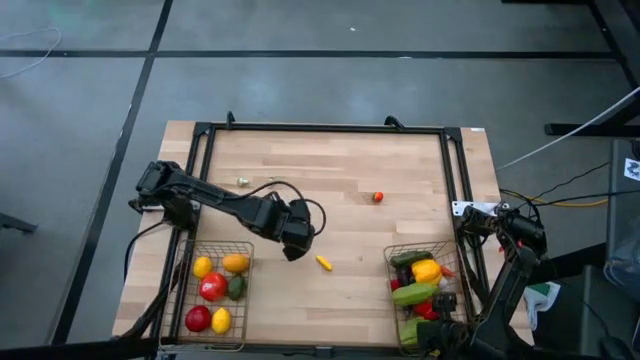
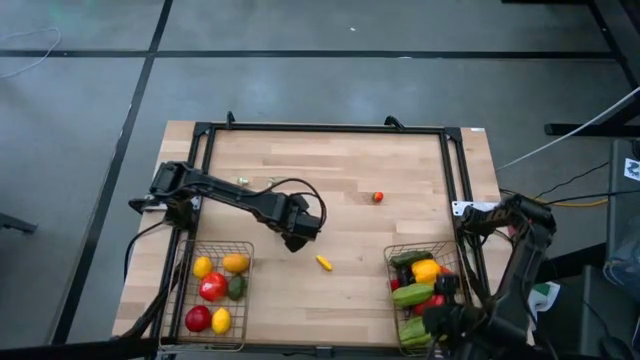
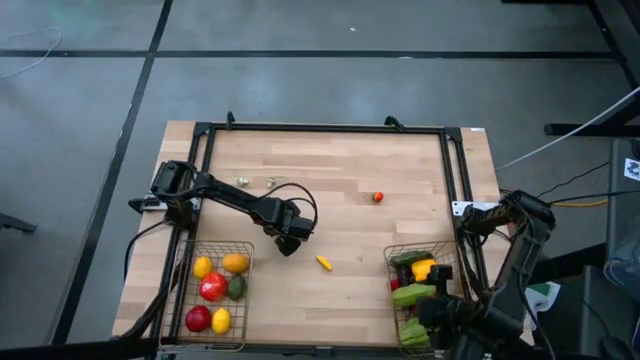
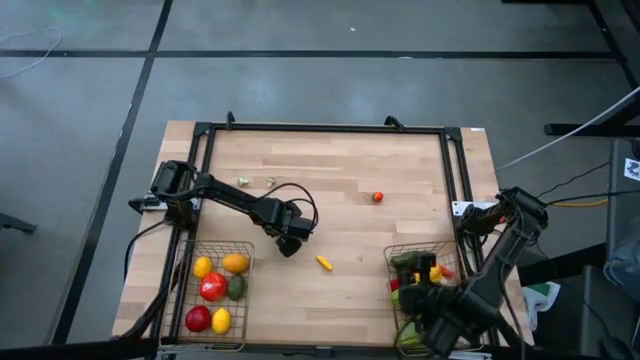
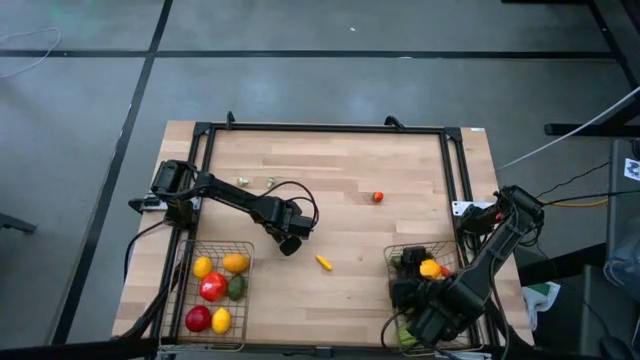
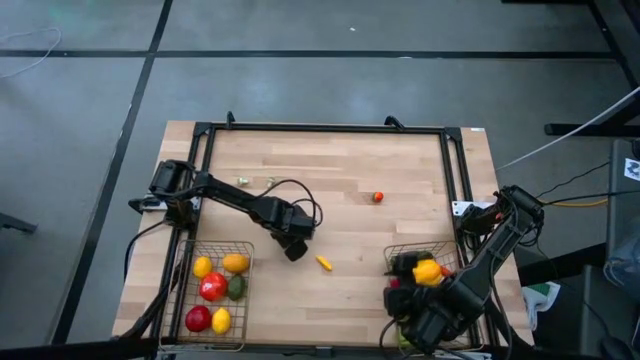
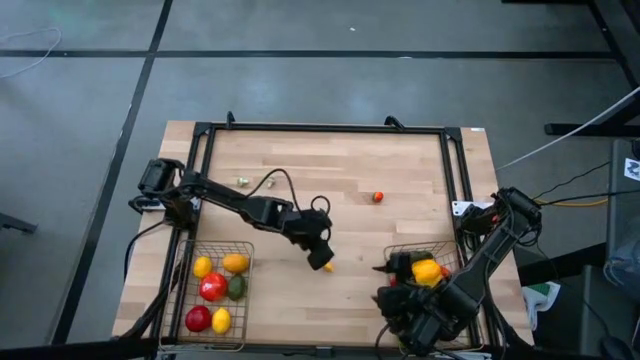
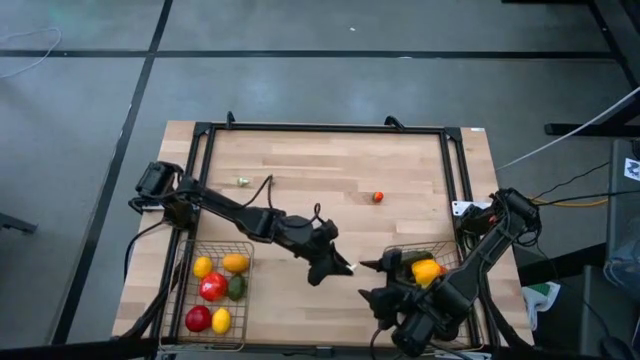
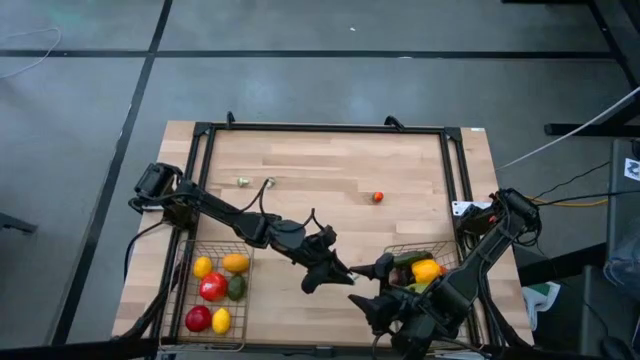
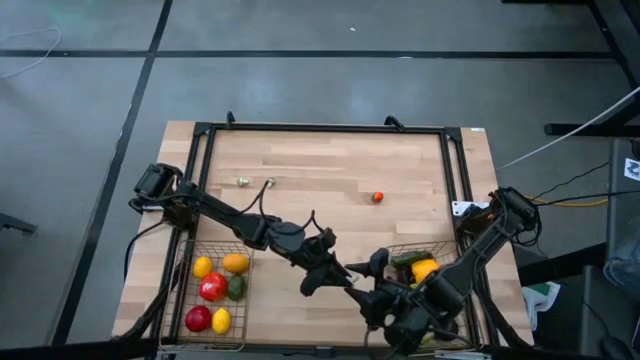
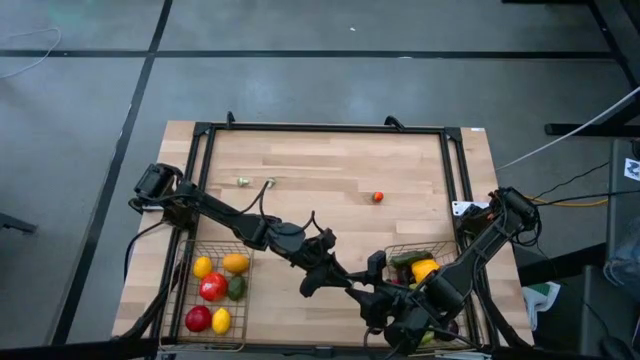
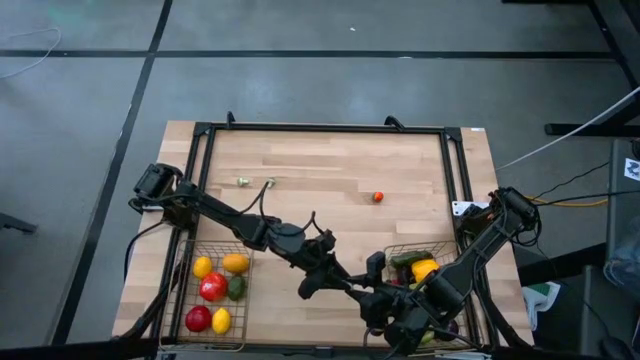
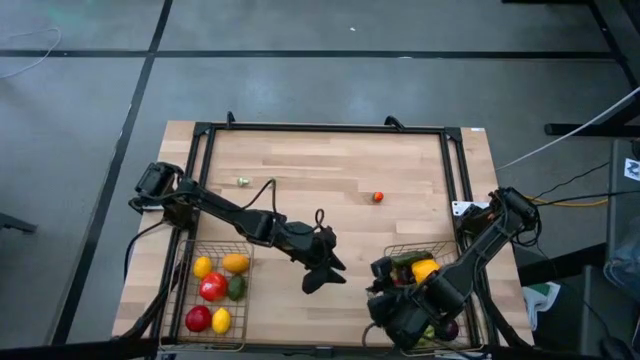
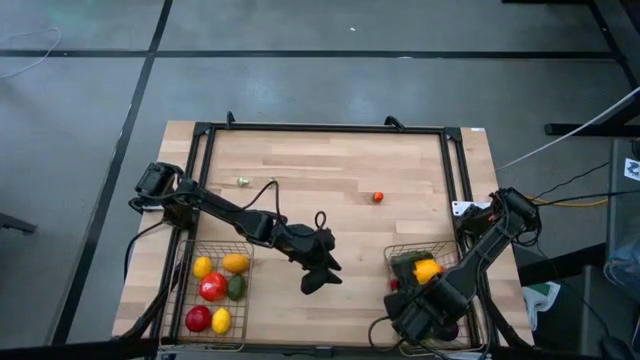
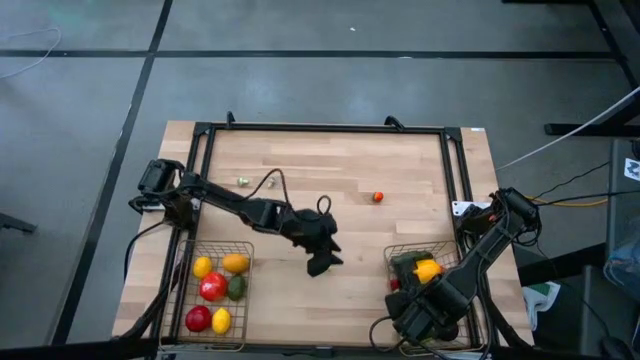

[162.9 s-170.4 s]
Task: Sort produce into baskets
Put the bottom center green mushroom into the right wire basket

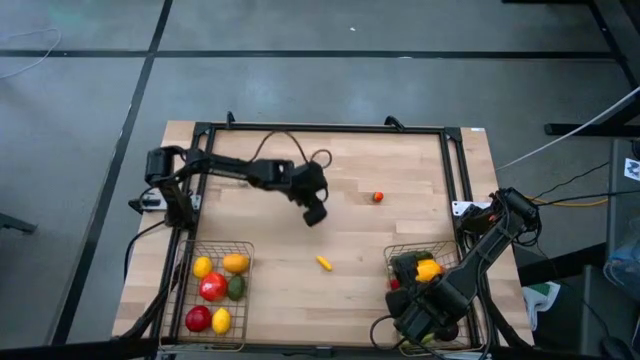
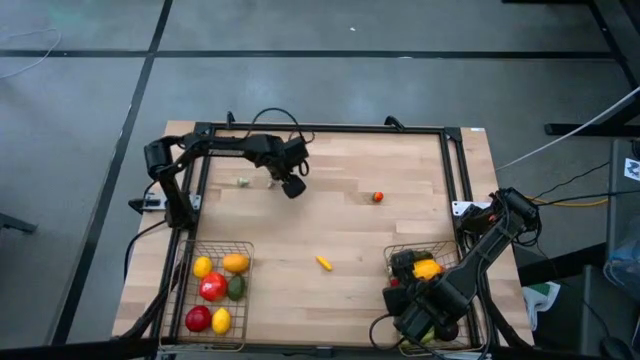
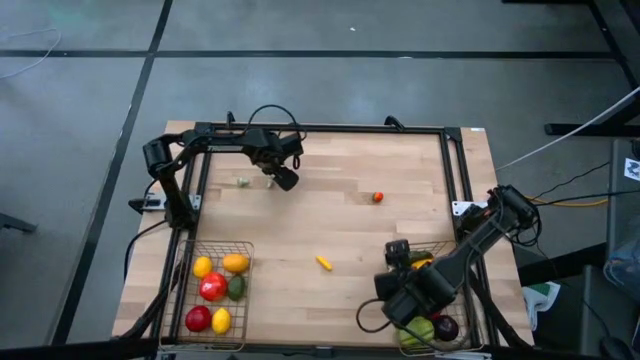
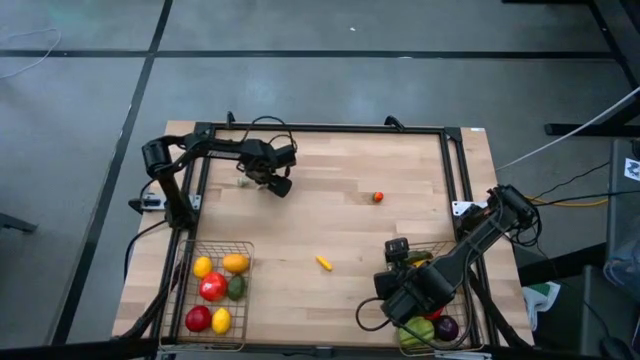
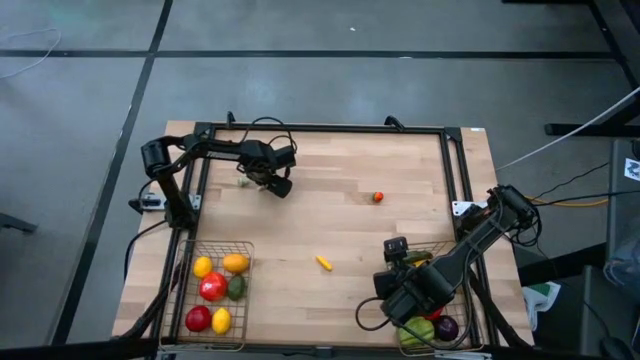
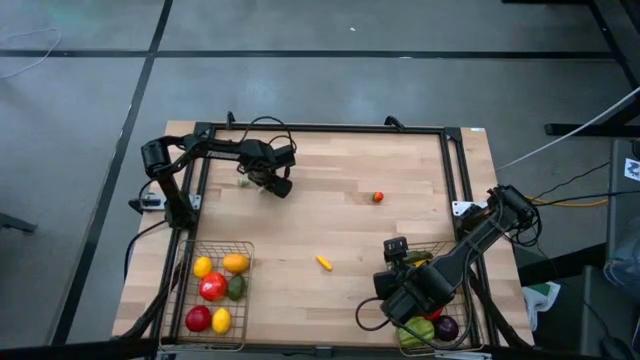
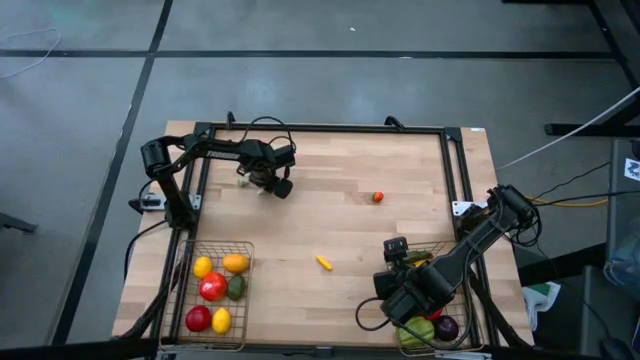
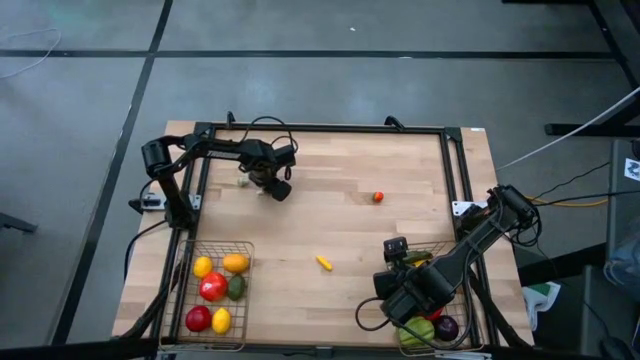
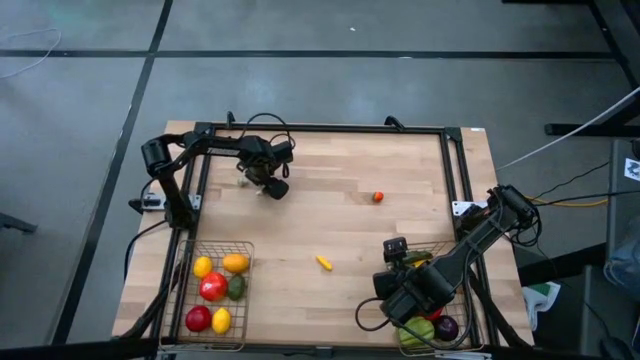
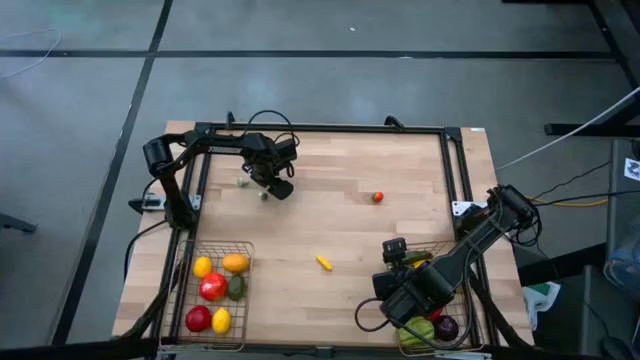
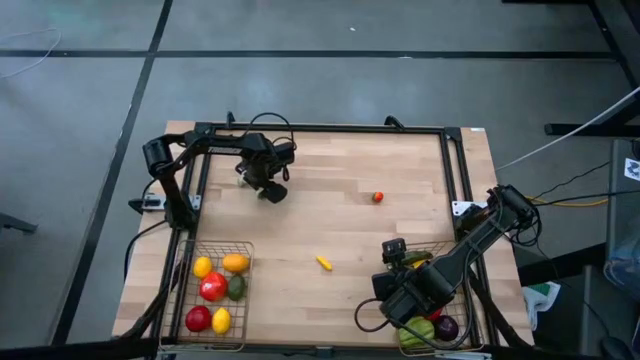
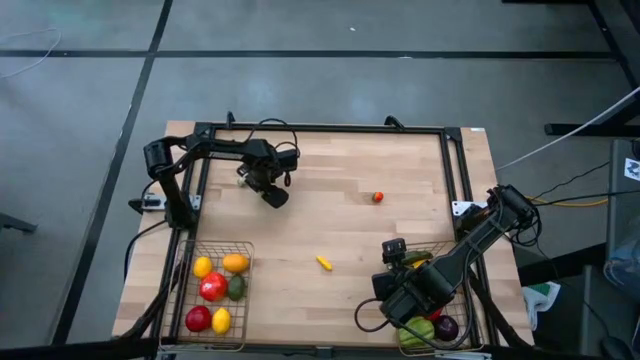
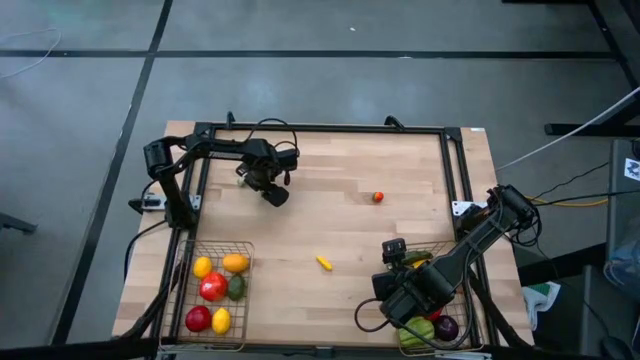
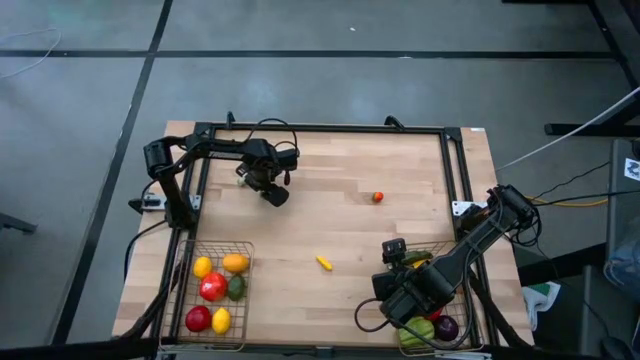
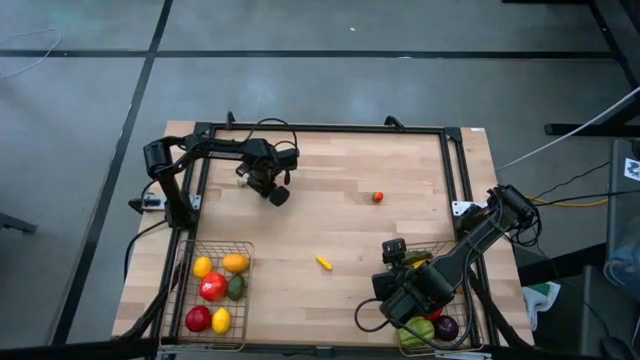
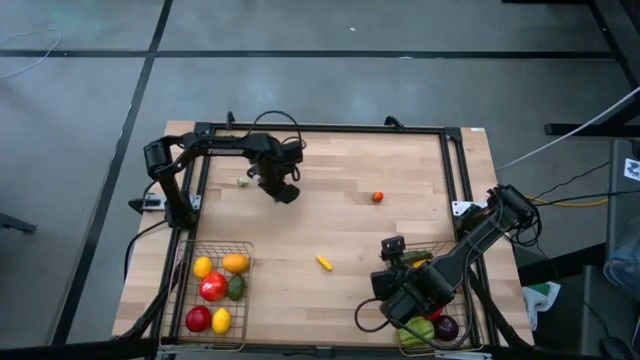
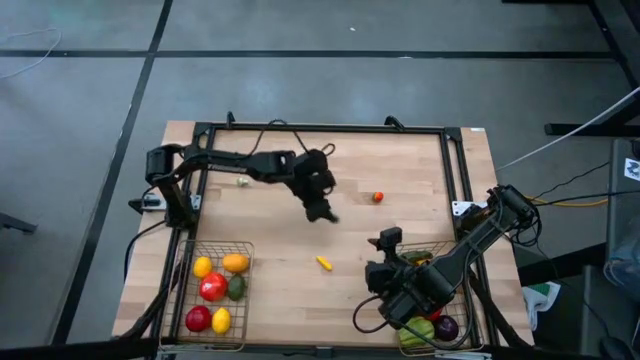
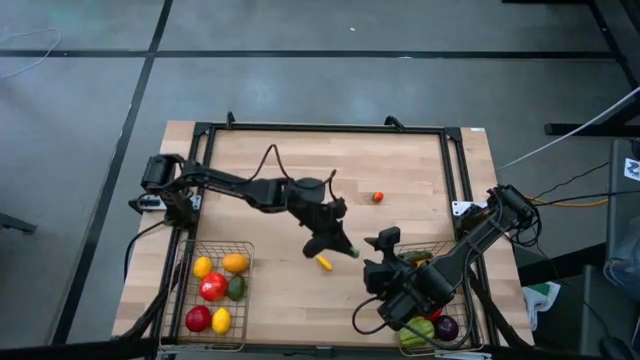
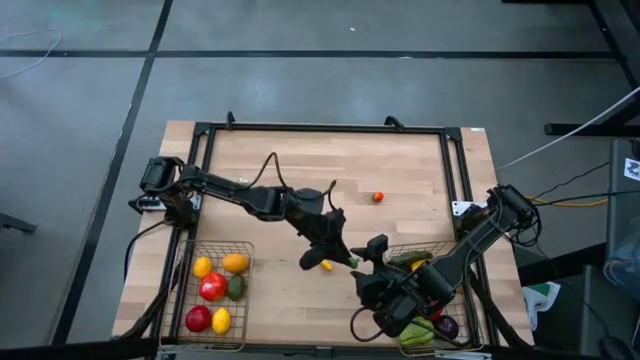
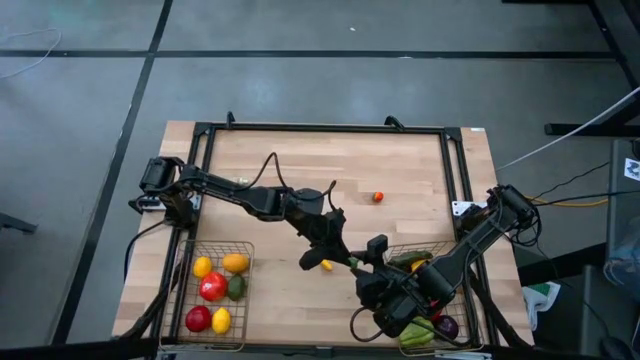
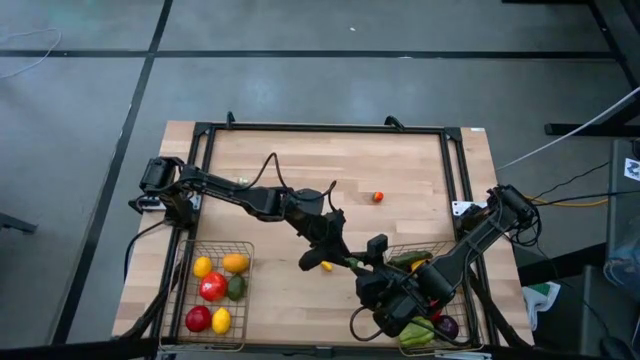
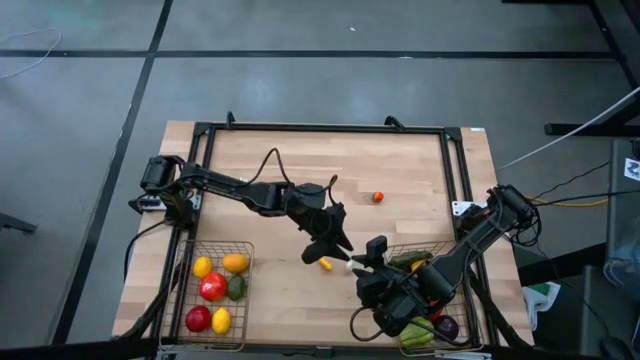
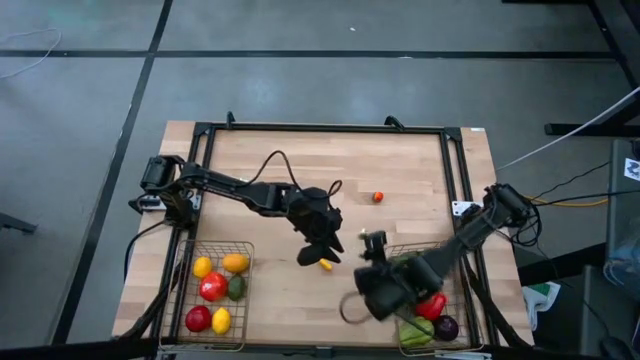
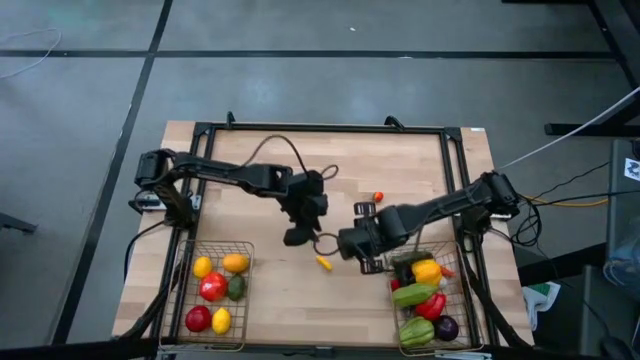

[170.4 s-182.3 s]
Put the right green mushroom into the right wire basket

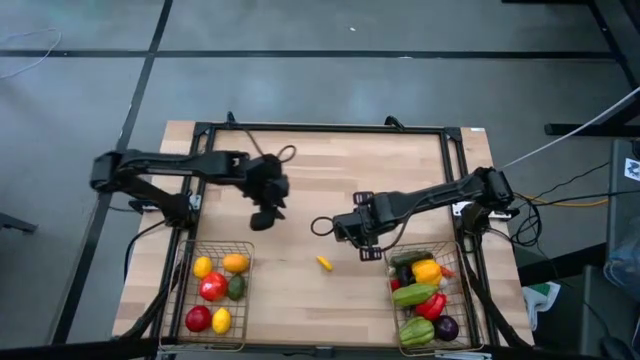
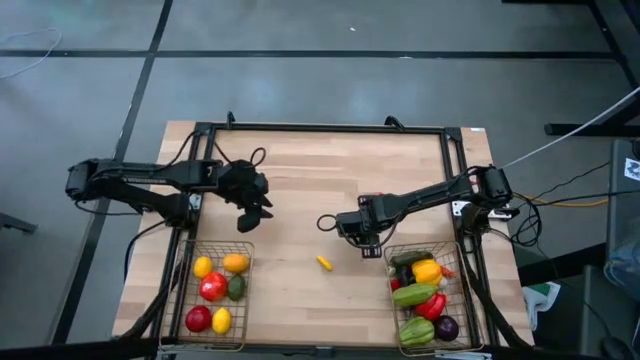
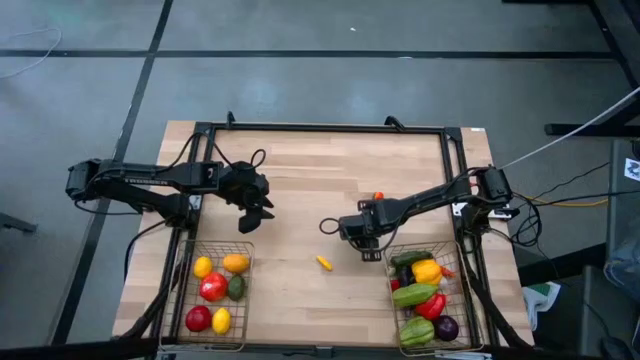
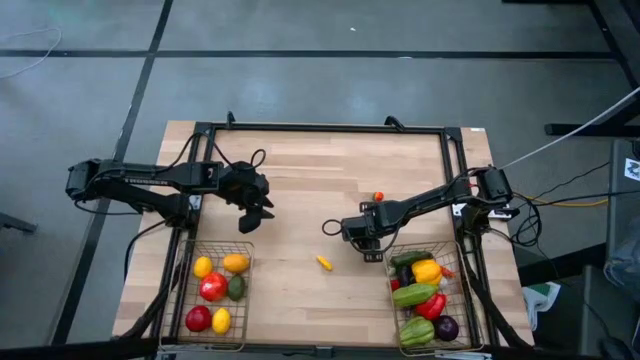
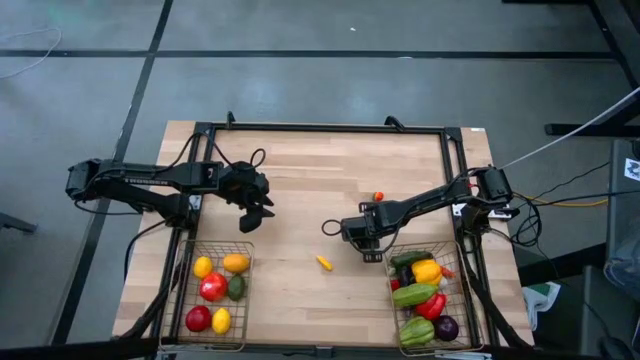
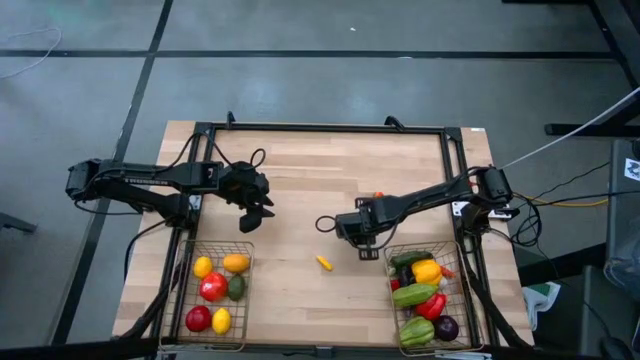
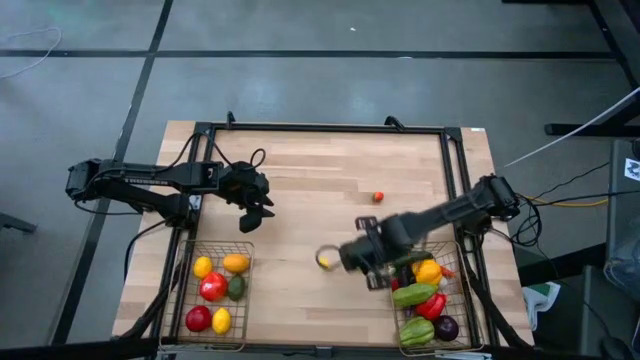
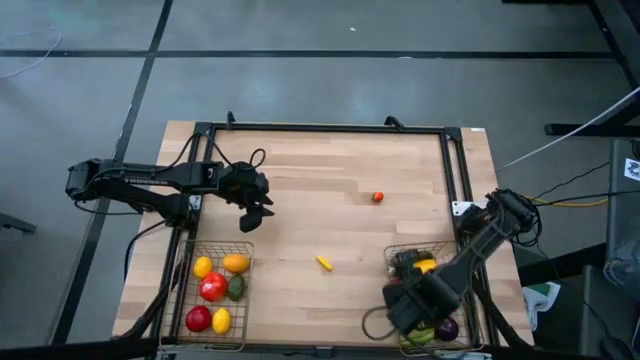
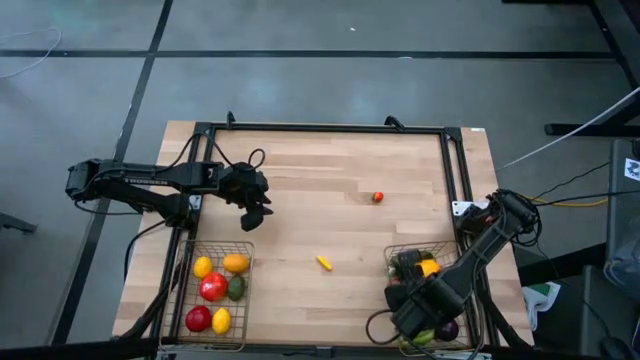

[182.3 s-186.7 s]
Put the right green mushroom into the right wire basket
